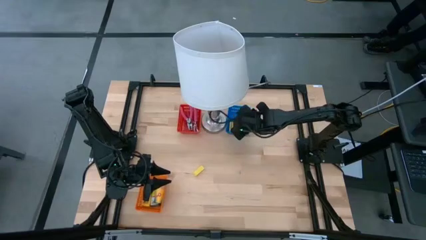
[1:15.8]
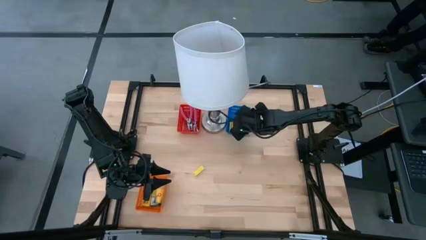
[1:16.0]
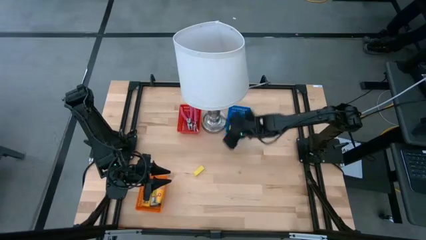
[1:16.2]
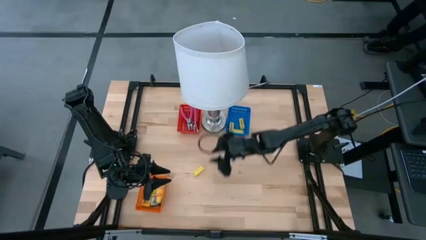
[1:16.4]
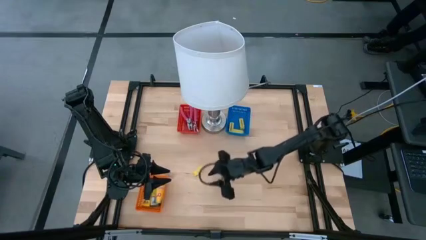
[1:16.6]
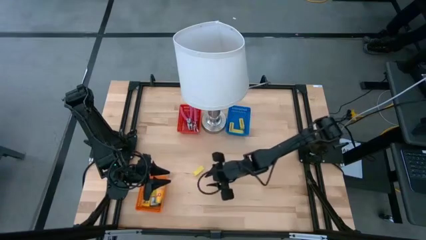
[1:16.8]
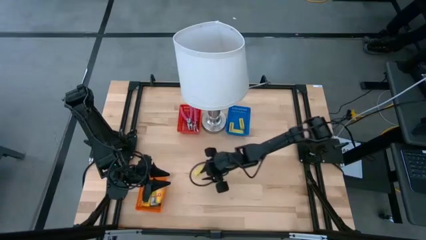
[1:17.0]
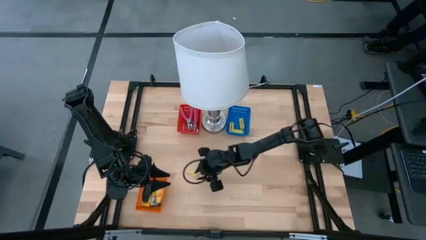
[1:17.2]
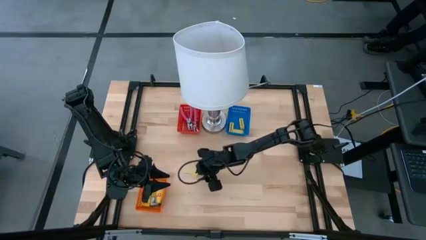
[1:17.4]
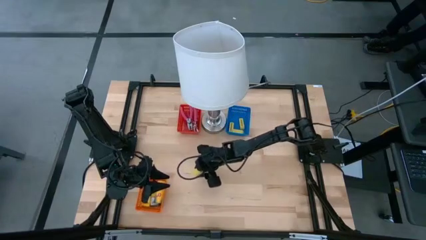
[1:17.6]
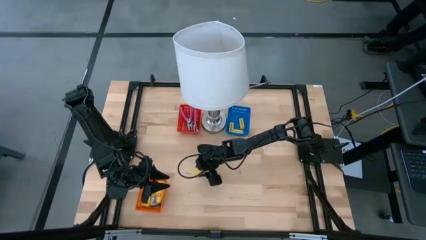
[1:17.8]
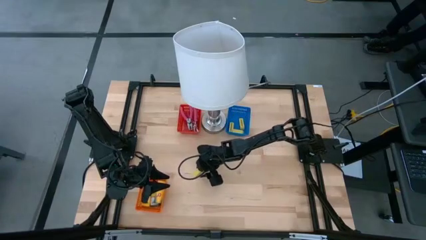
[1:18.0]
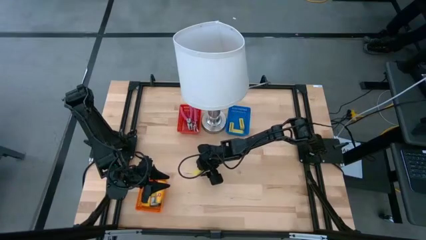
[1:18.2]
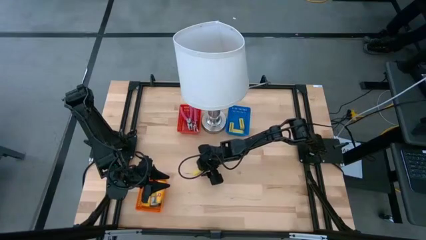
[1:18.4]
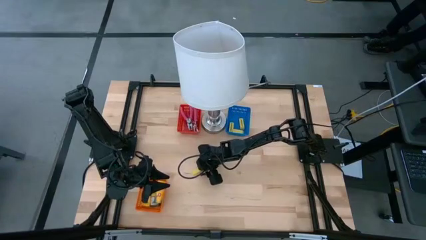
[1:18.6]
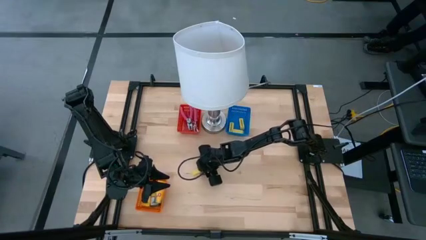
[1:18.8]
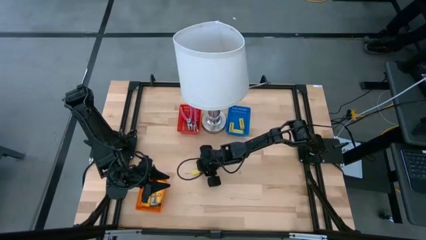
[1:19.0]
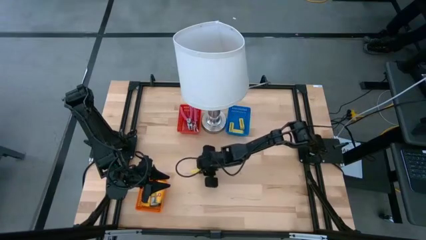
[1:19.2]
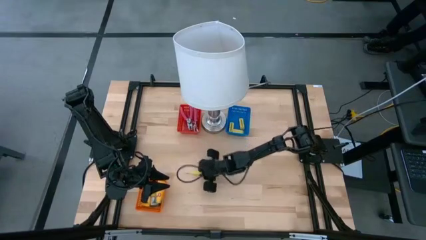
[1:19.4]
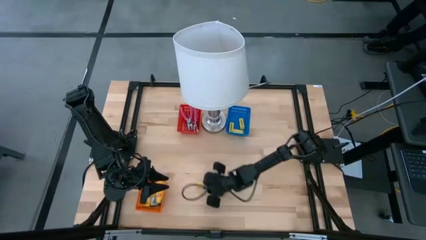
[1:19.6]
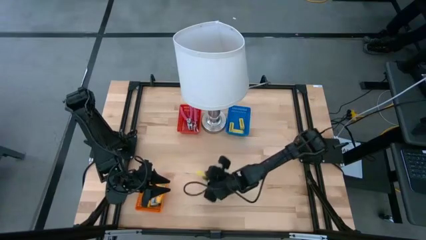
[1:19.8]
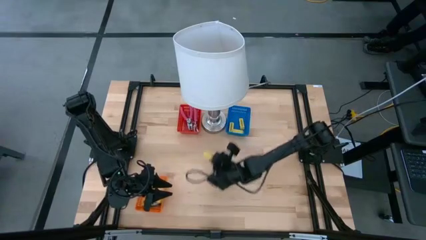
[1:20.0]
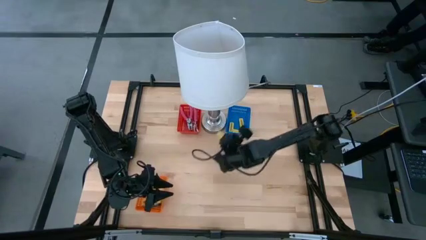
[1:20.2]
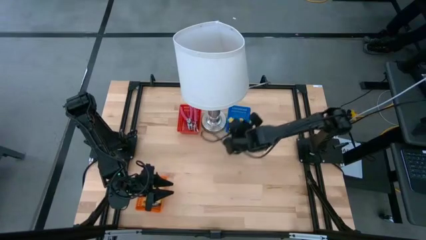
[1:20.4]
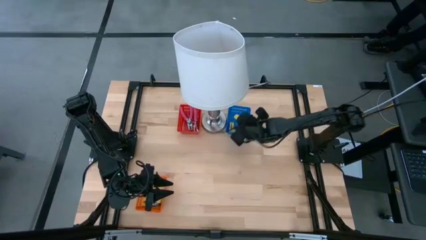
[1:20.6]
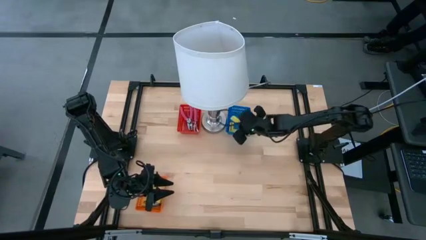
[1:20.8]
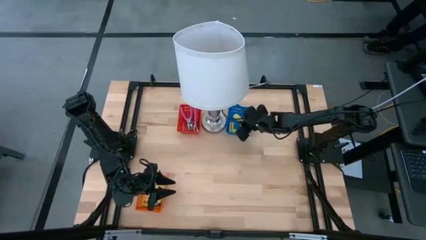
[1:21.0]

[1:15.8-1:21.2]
Task: Pick & Place School Supplies
Put the yellow eraser into the blue basket

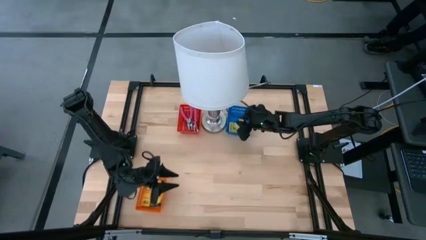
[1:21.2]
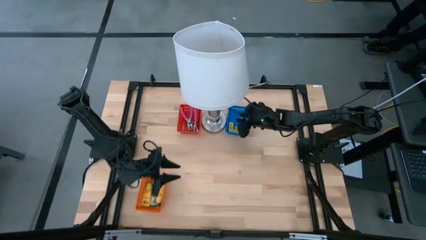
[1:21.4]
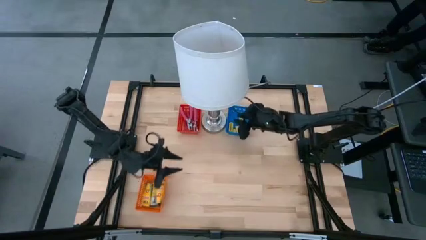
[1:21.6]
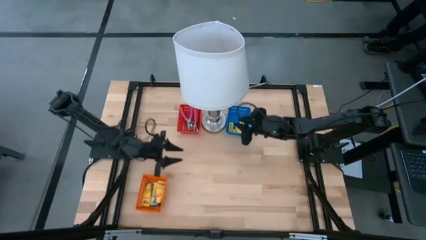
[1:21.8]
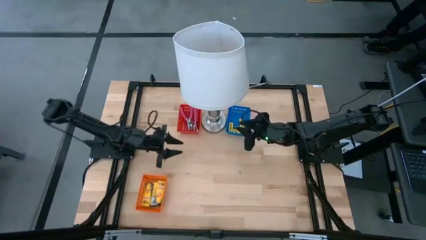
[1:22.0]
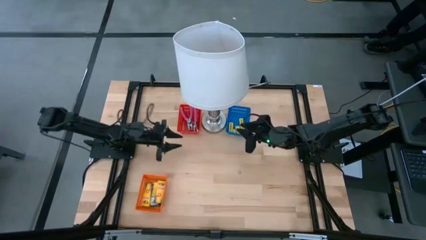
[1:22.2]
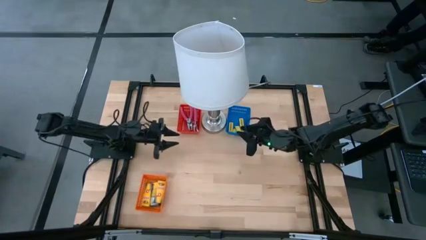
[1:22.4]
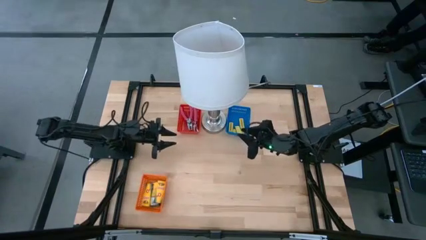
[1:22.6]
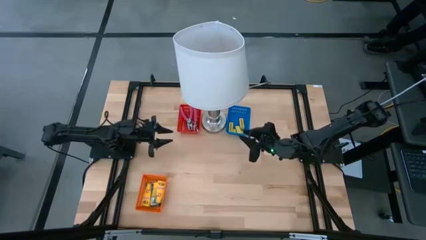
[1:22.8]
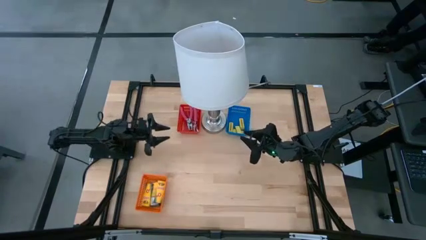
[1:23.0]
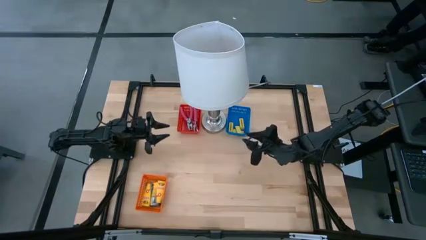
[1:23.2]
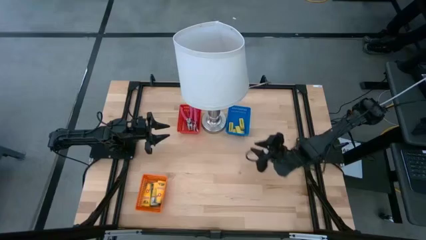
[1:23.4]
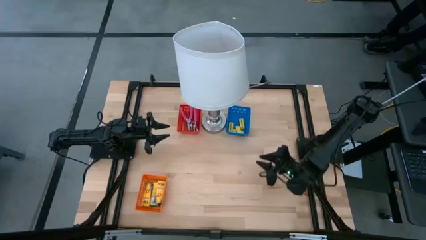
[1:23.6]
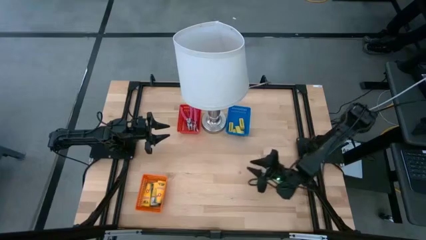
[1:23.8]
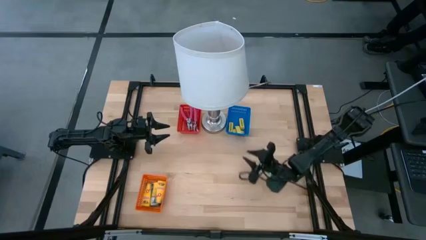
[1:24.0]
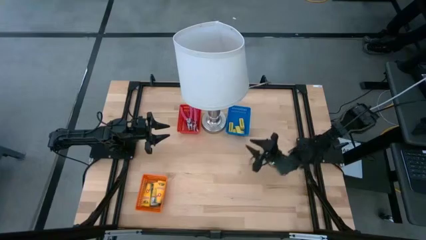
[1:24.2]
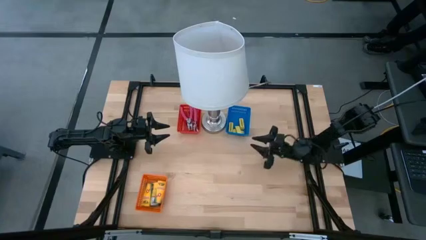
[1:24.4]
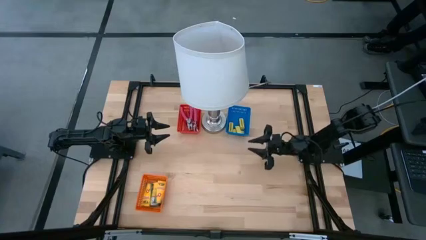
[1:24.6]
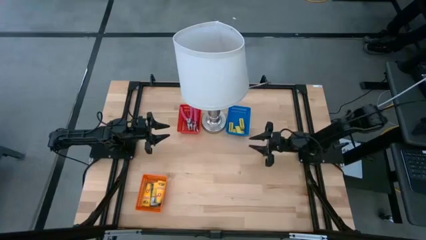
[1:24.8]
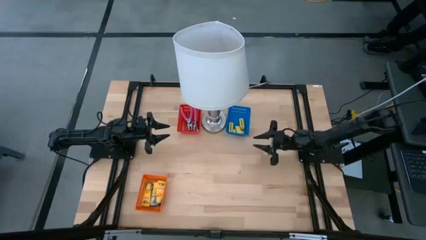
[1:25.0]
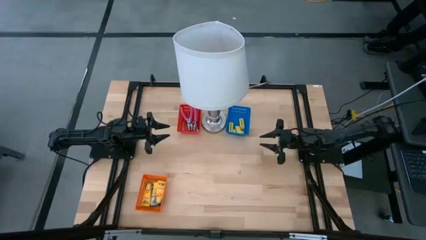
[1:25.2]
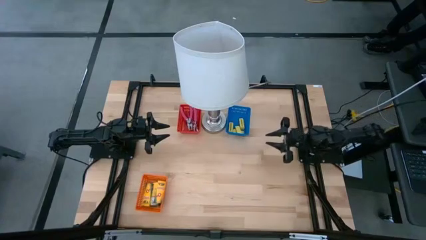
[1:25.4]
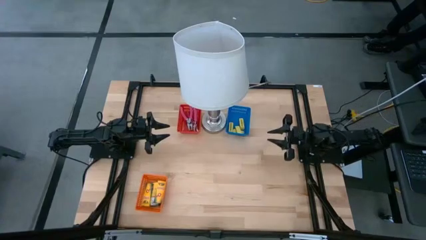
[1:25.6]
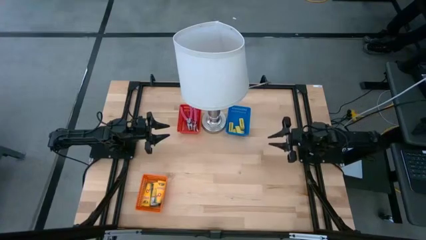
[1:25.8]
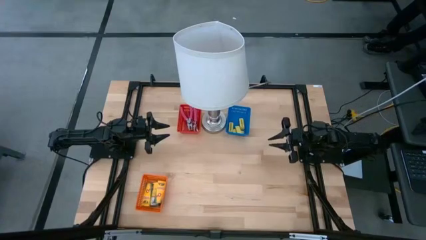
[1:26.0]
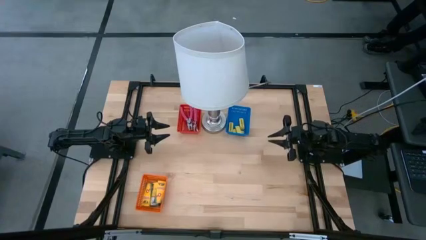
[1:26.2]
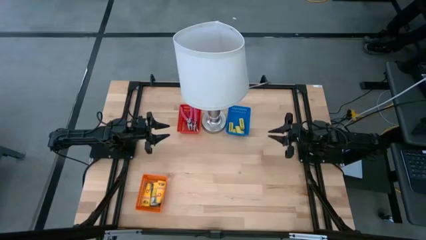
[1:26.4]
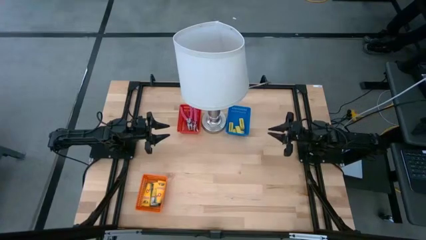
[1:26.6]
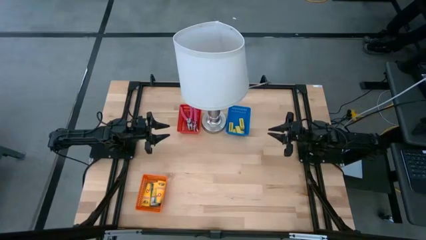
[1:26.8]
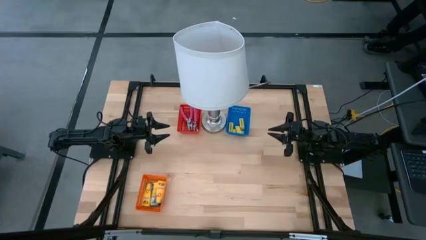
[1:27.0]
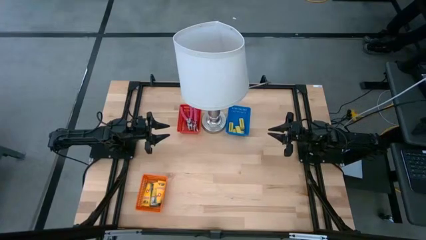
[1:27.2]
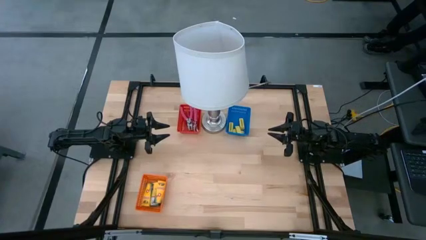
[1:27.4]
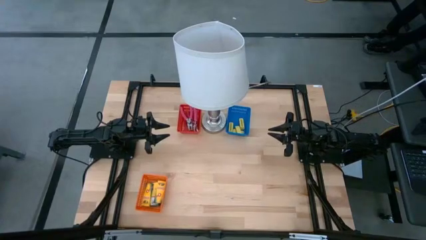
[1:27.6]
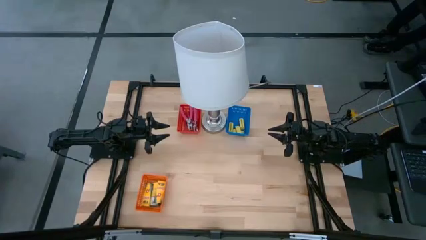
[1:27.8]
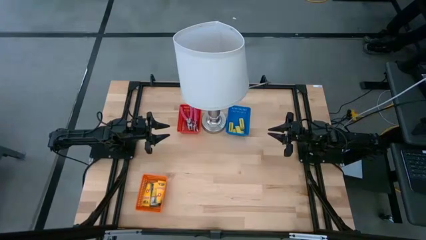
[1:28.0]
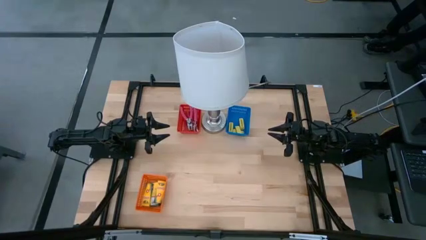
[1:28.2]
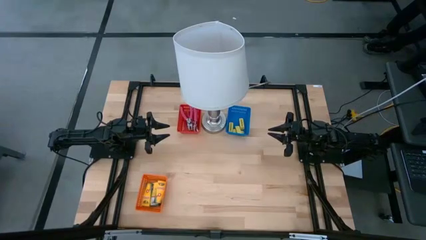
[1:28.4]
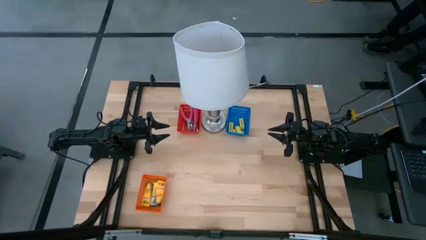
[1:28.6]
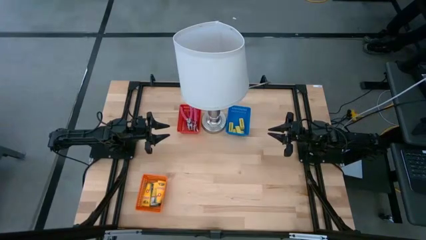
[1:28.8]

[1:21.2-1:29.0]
Return to Home Position
